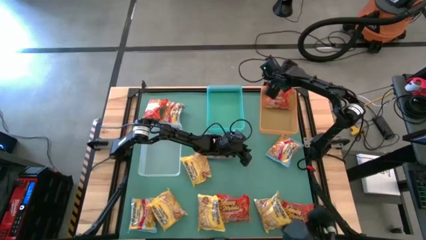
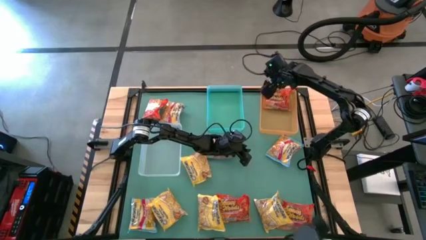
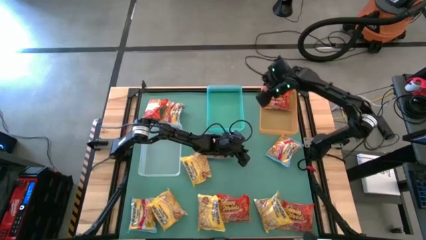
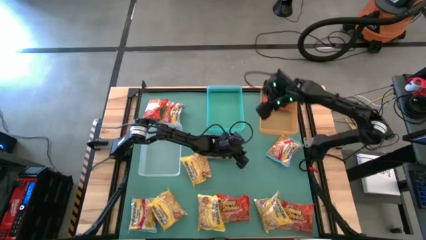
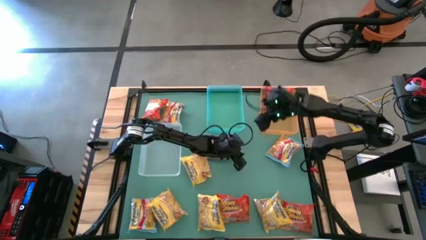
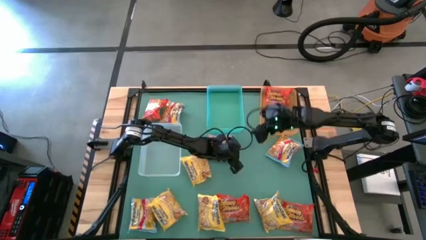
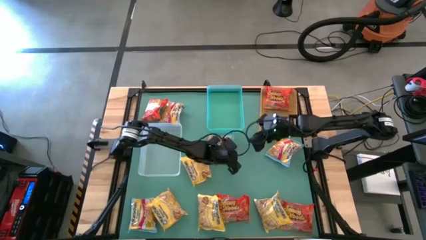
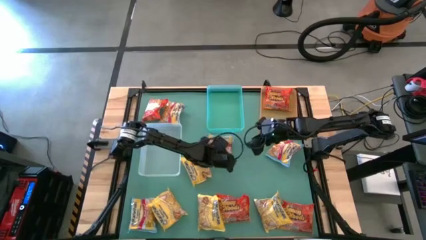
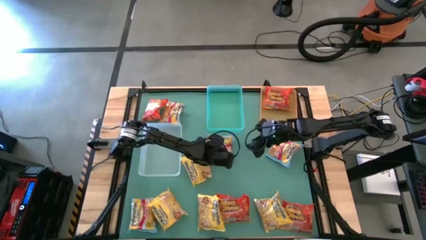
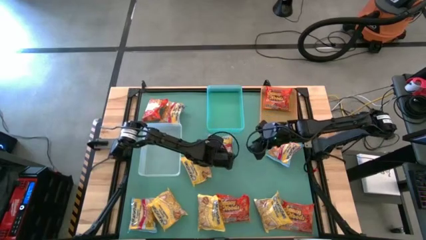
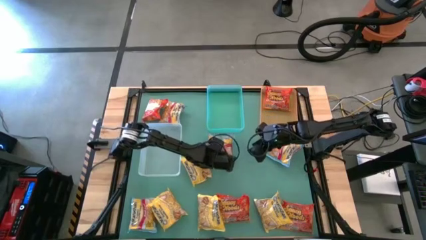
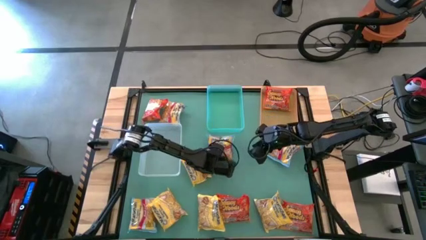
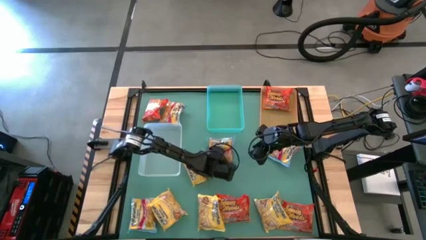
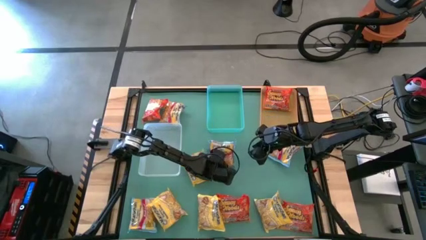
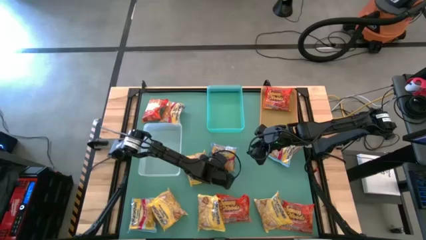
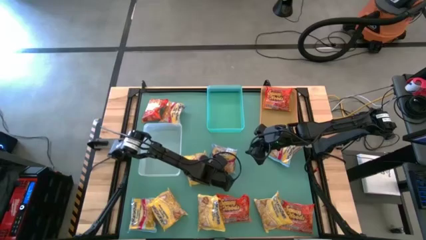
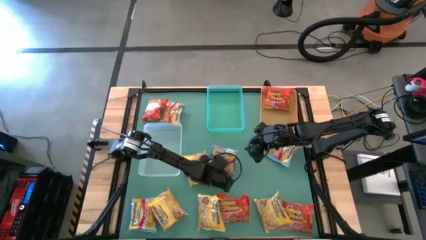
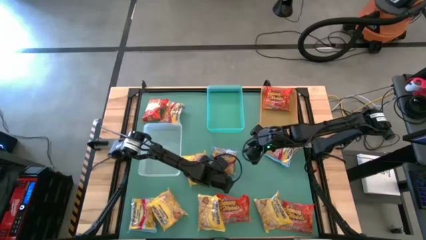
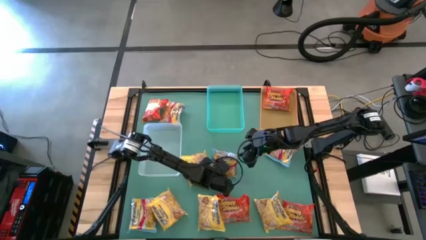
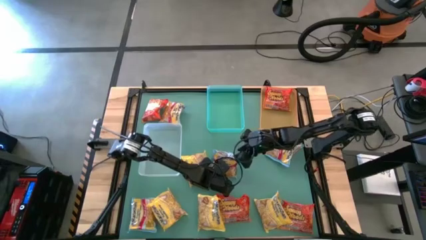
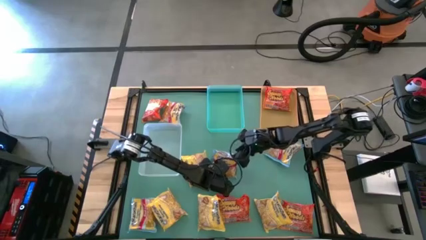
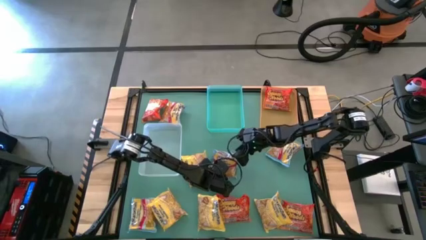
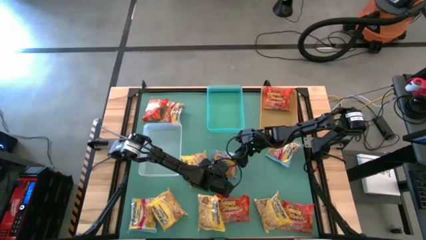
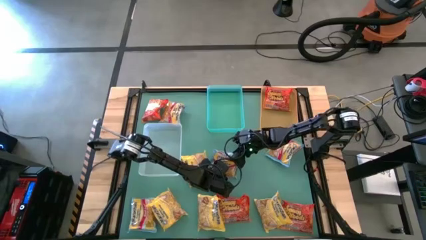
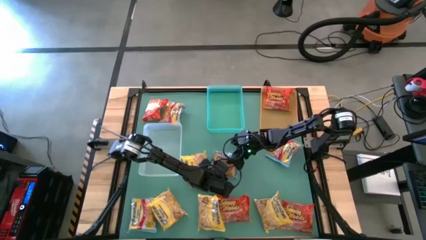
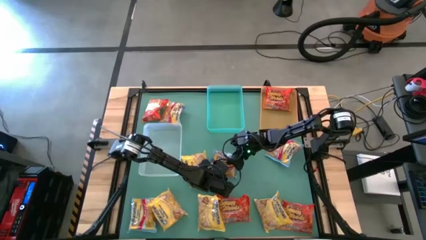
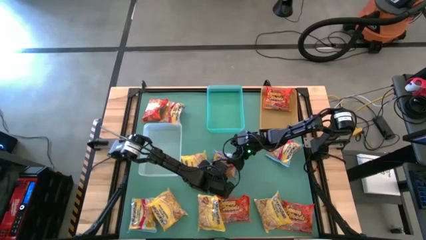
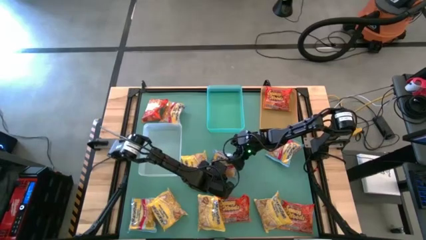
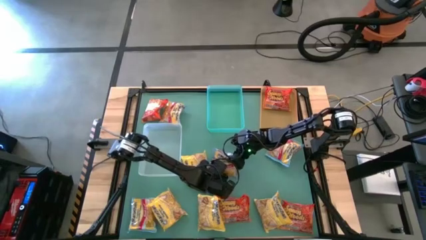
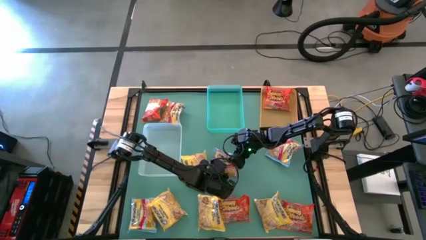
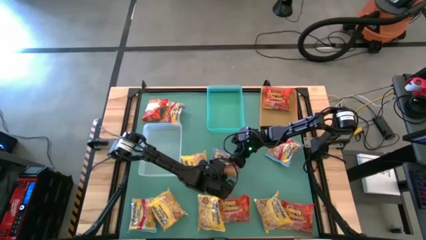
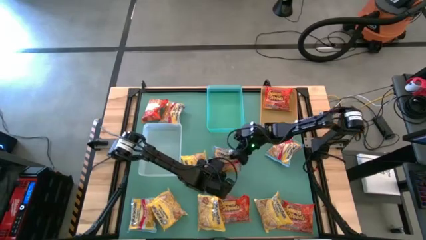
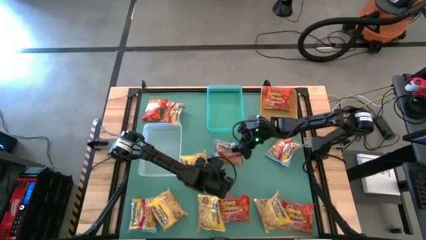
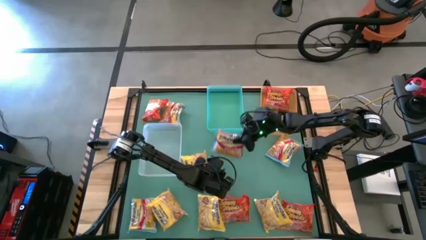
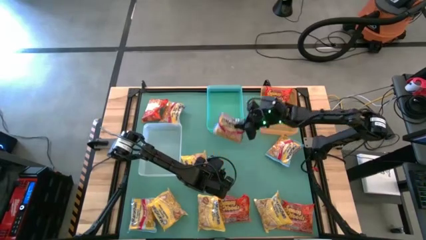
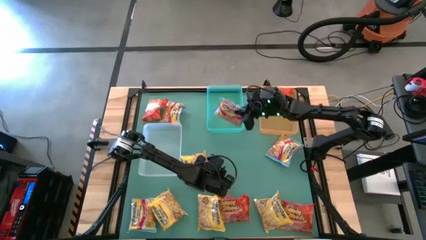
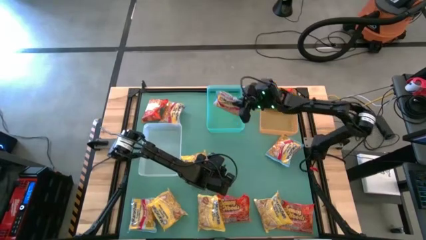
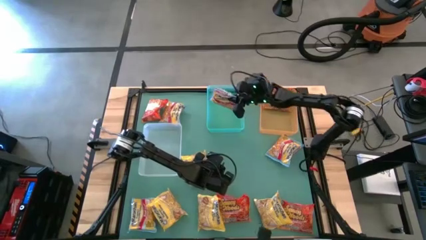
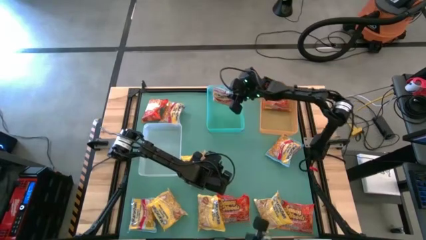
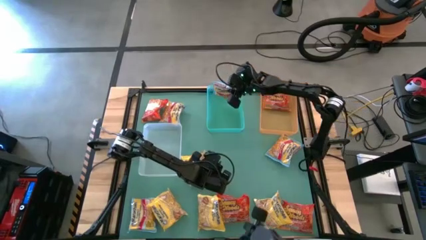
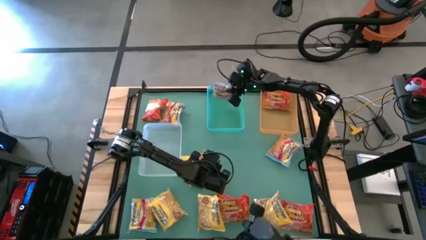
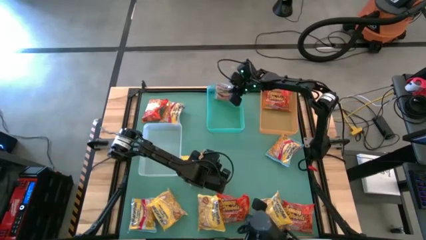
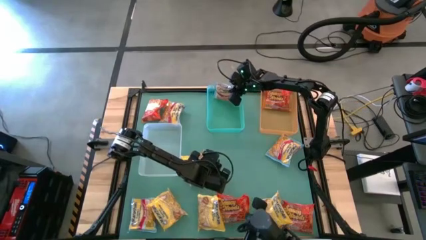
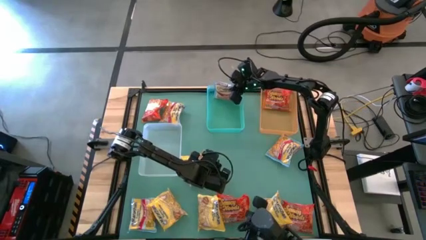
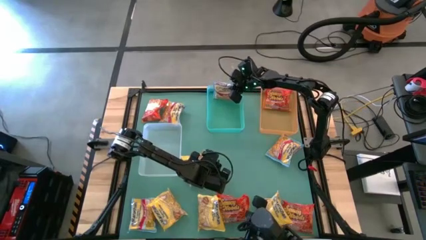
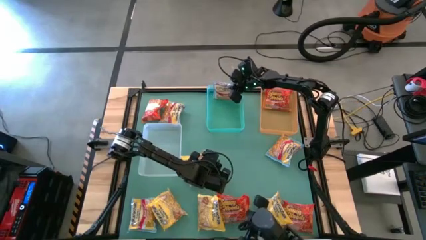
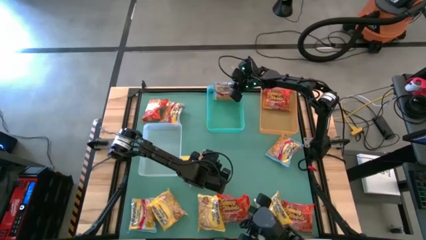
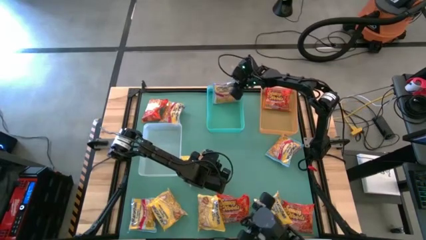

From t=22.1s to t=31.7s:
Task: Sort Maruchan noodles
Put the blue noodle pack into the blue bin

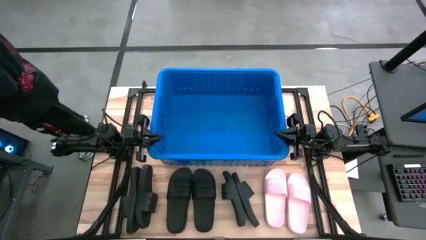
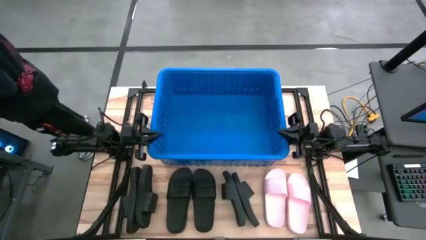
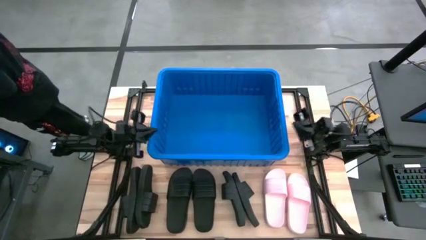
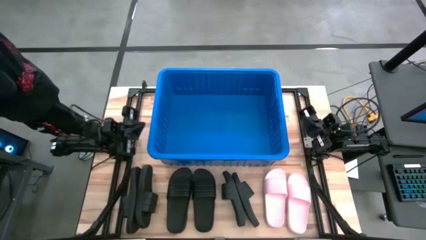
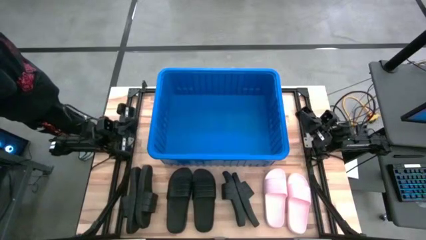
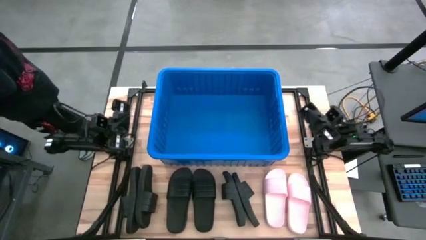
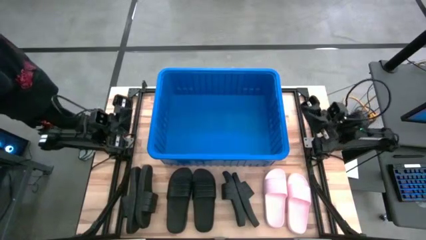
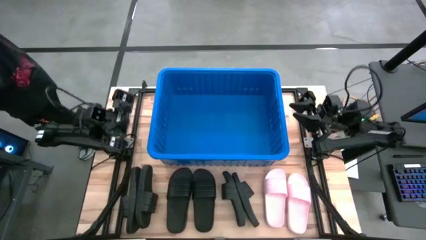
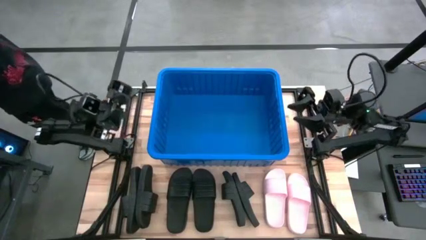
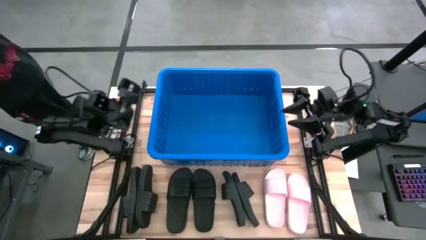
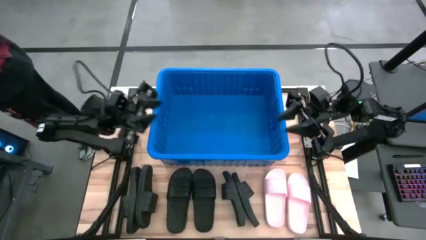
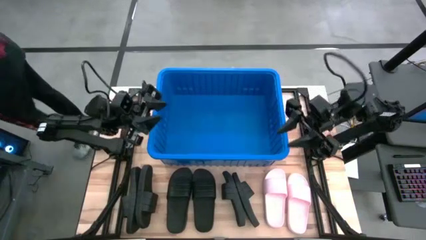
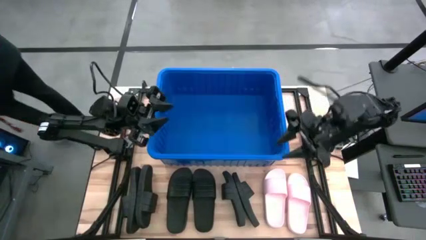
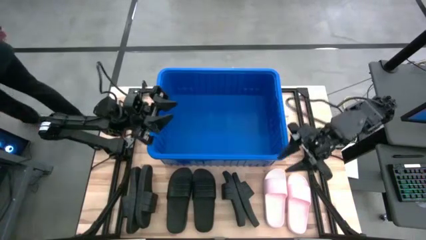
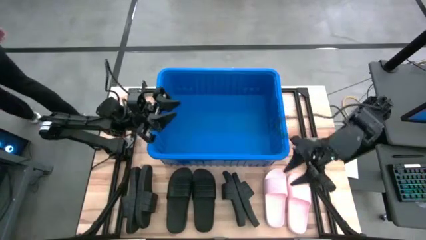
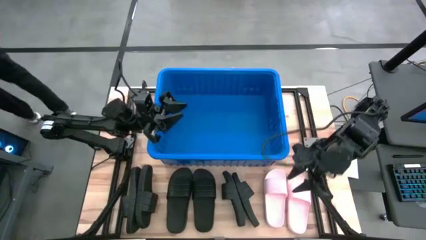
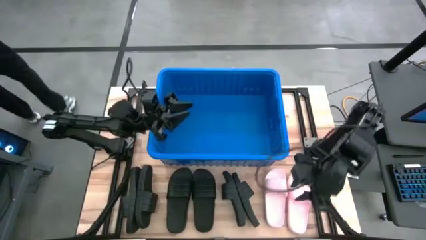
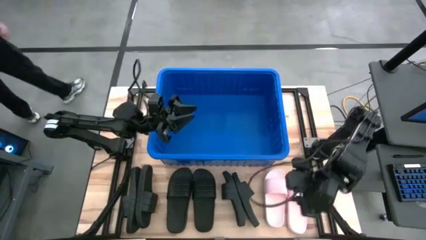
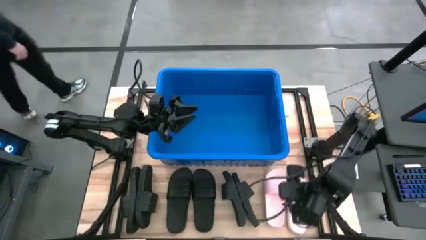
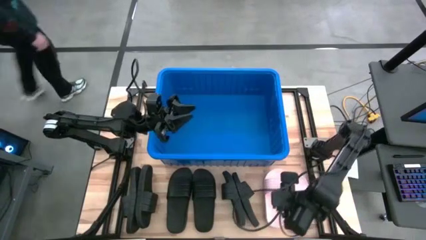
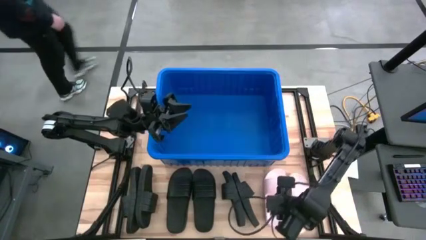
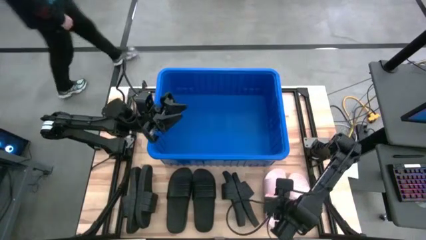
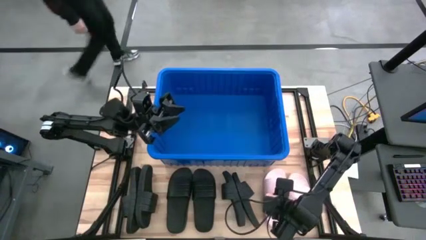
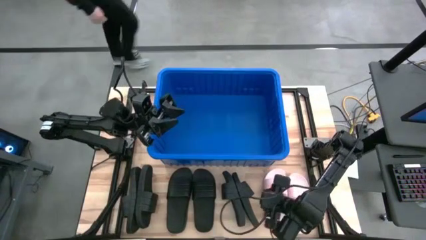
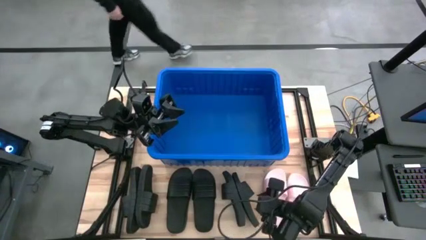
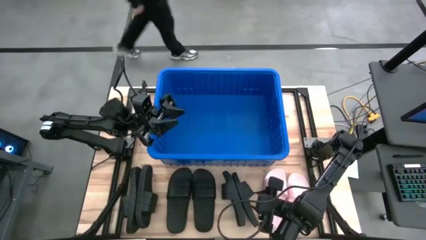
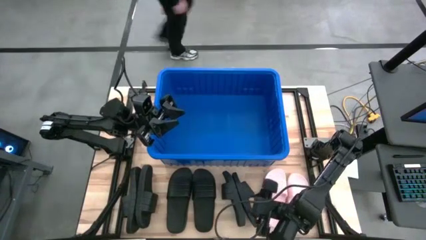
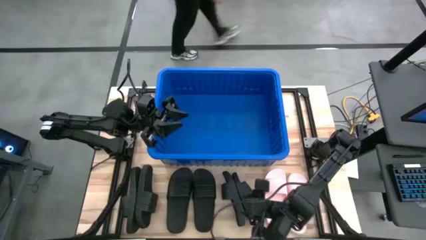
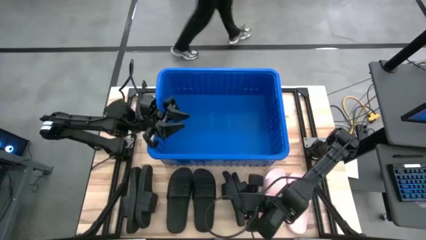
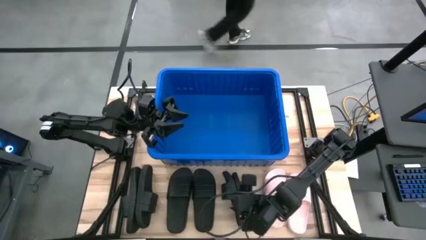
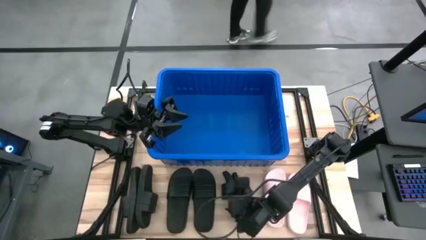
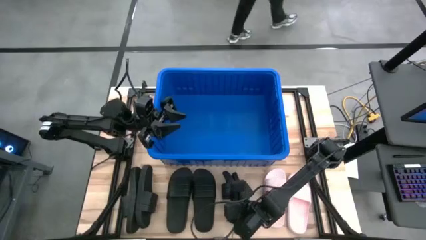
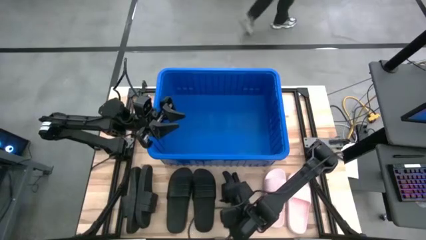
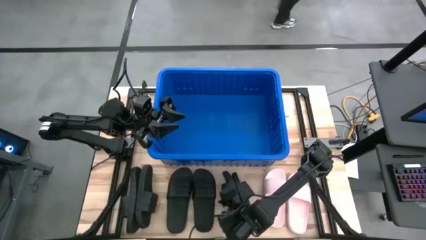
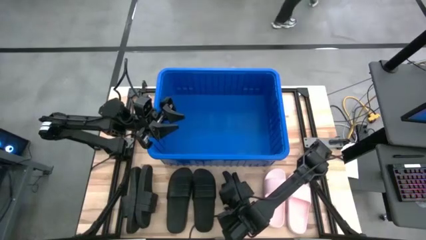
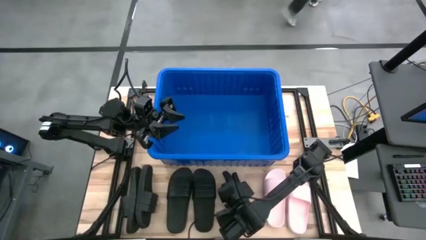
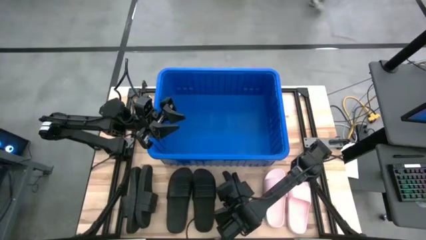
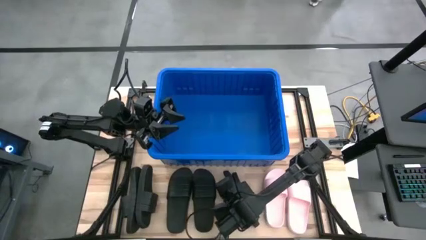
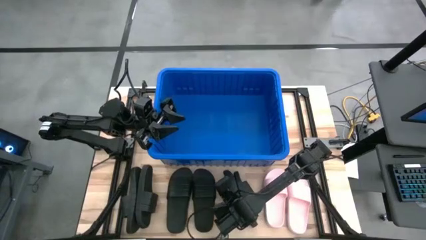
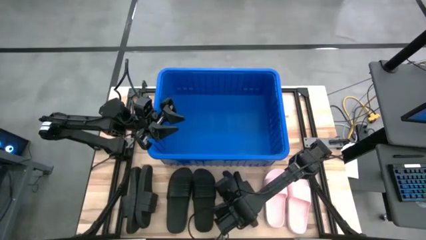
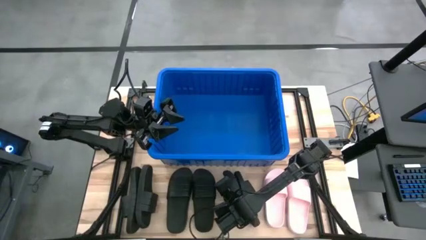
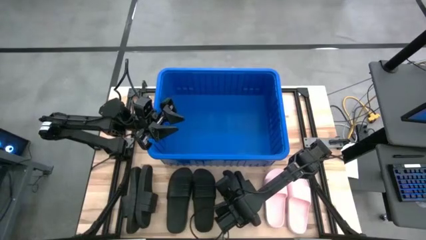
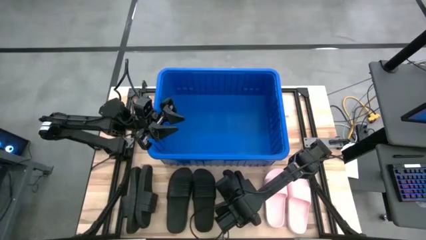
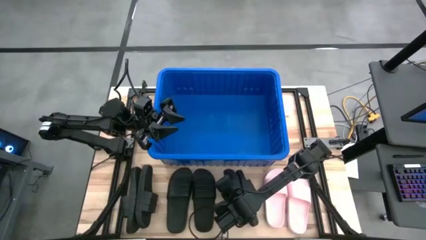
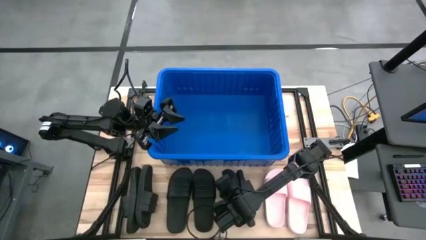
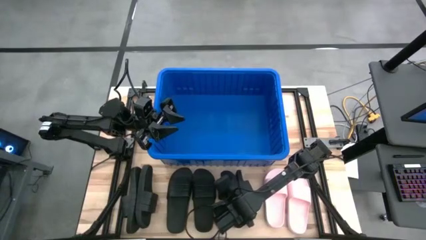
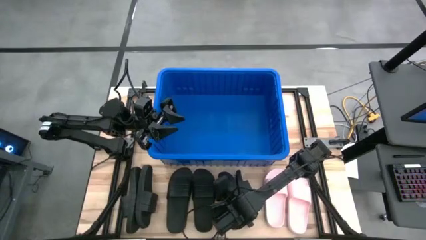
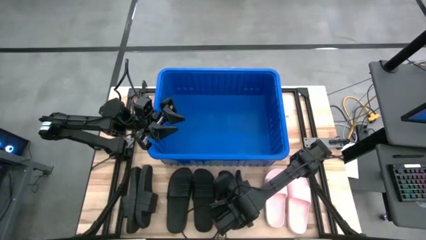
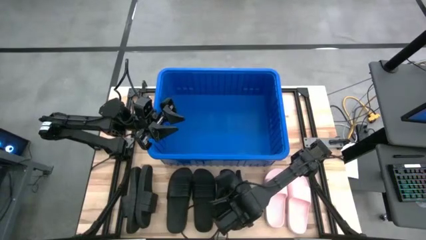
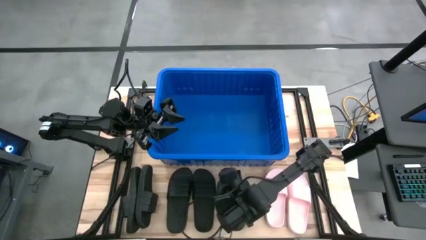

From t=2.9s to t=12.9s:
Task: Pick and place slides into bin
Put the black slide into the blue container
